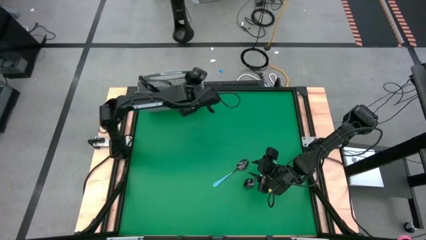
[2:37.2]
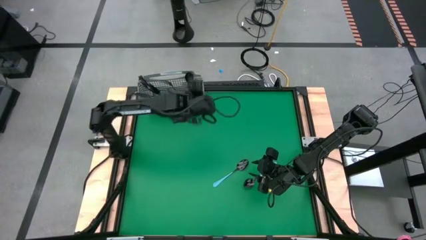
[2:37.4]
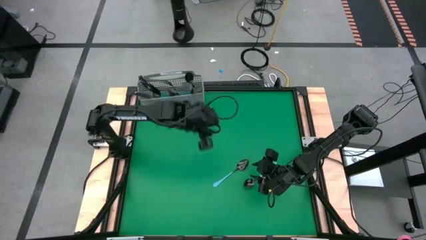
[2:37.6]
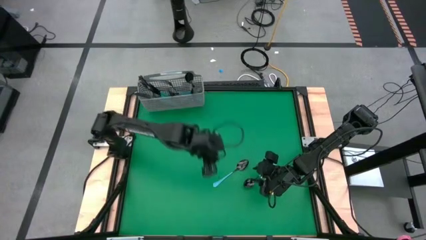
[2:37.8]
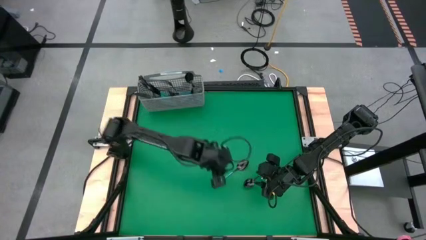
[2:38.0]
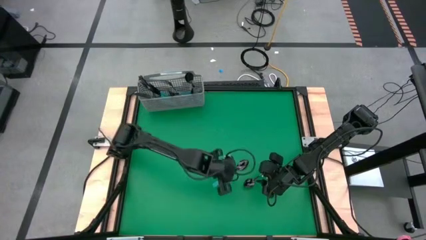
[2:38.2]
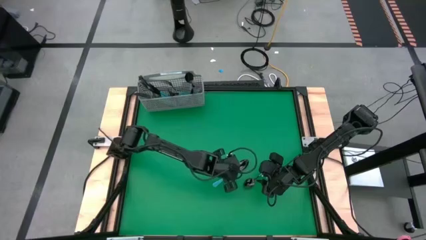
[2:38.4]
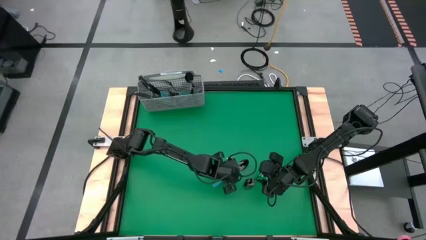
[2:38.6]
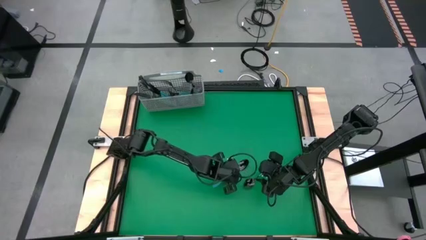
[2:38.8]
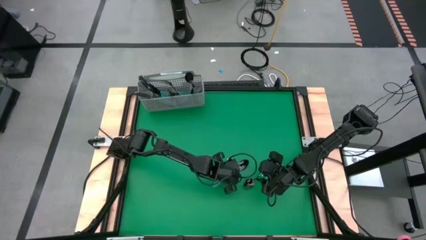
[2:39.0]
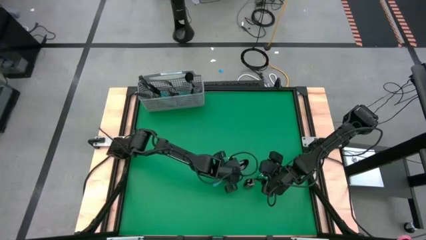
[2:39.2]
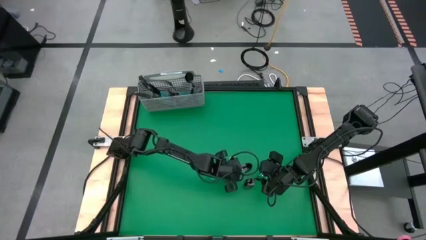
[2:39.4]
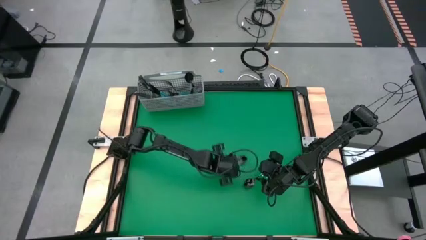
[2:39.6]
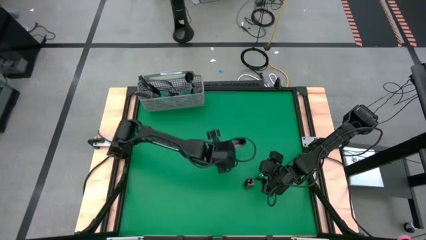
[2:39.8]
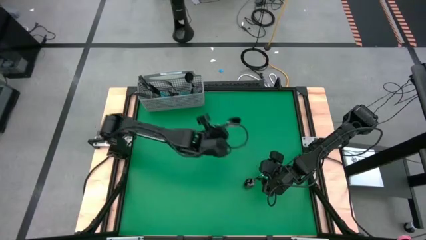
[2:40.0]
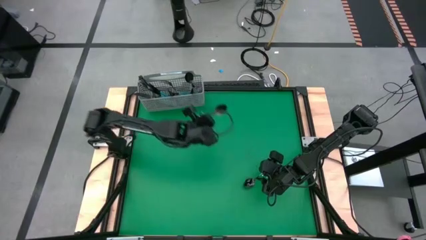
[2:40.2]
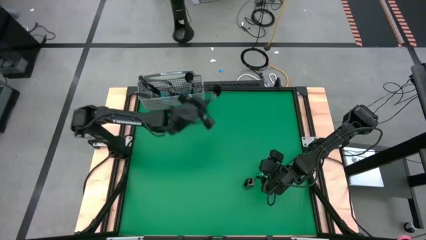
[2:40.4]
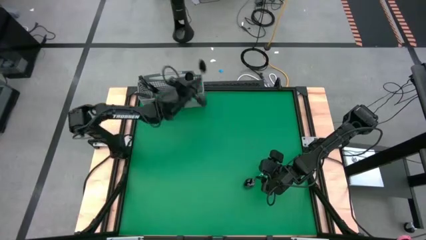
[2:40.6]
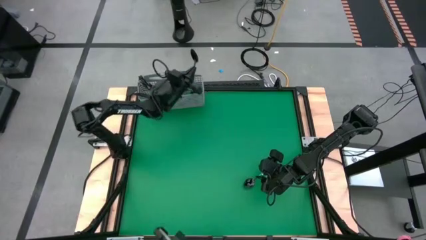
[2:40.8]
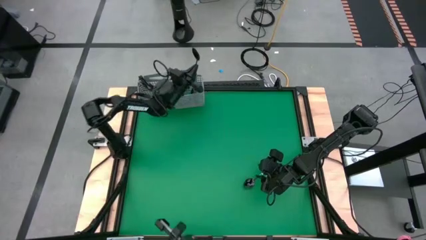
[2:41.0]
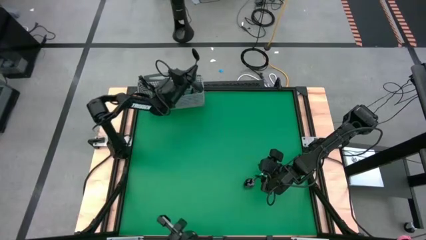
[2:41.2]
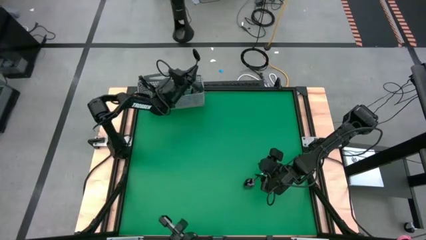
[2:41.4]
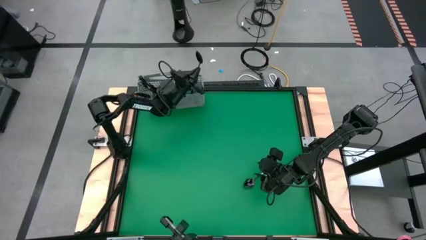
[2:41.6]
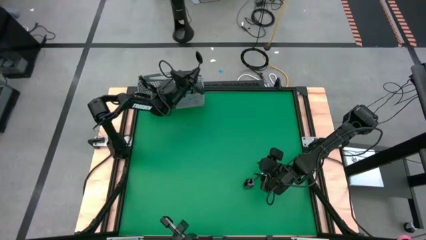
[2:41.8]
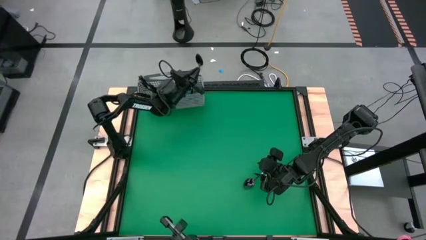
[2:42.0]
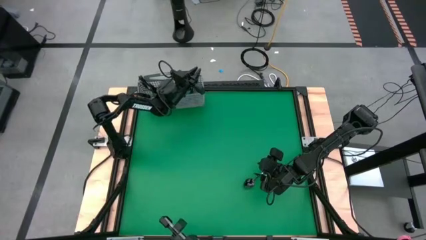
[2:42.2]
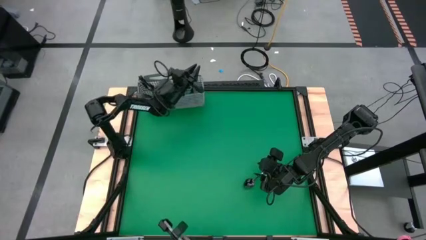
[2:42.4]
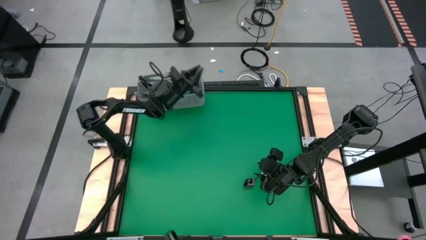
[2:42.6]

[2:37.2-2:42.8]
Task: Sort silverware
Put the spoon into the silverware rack

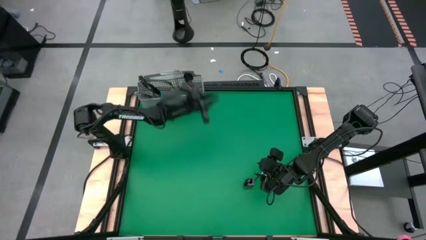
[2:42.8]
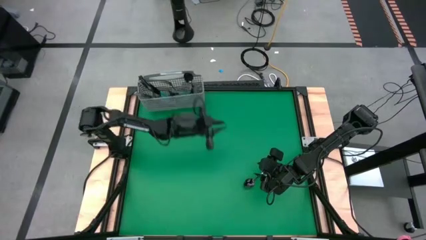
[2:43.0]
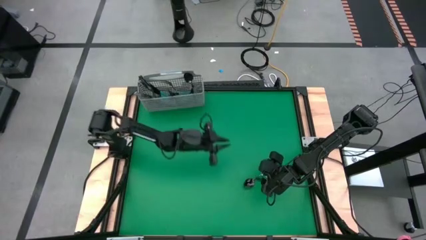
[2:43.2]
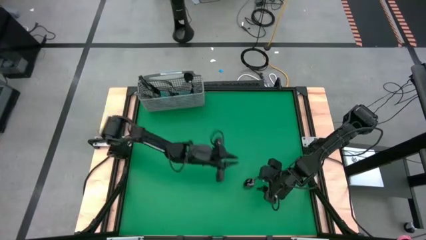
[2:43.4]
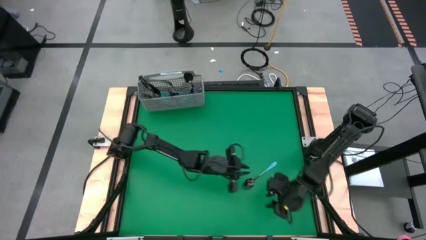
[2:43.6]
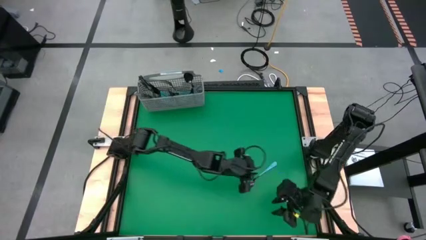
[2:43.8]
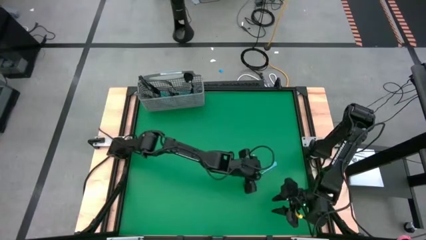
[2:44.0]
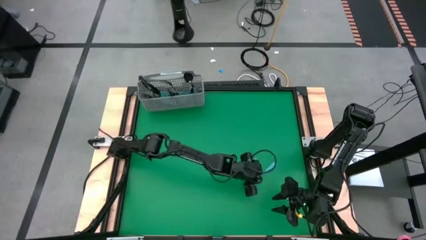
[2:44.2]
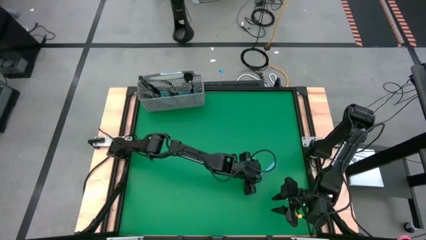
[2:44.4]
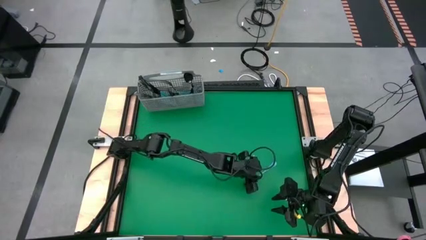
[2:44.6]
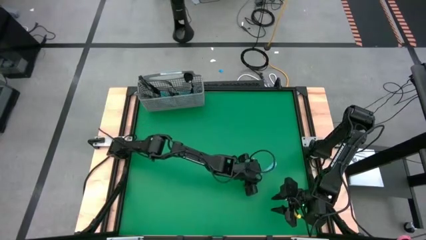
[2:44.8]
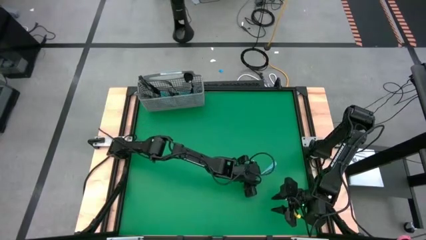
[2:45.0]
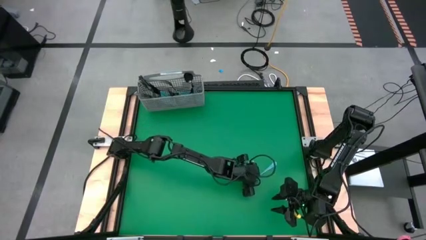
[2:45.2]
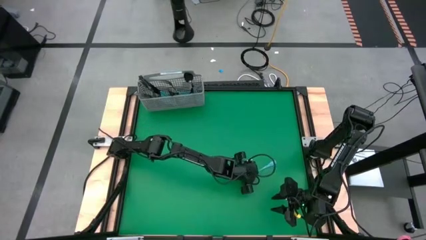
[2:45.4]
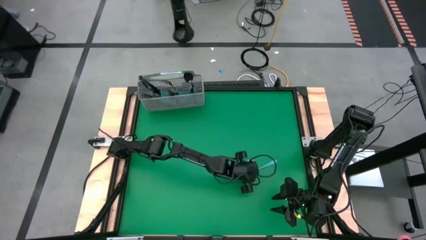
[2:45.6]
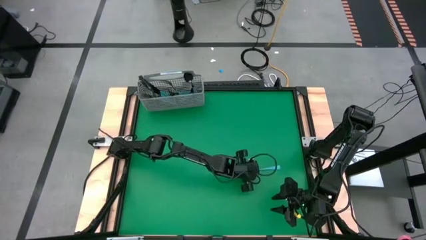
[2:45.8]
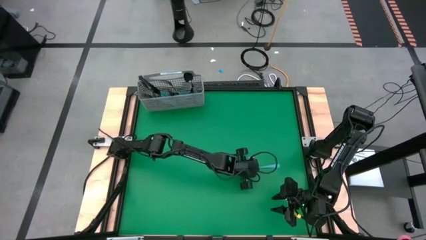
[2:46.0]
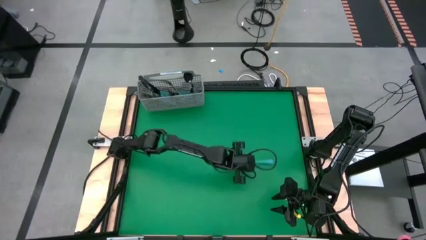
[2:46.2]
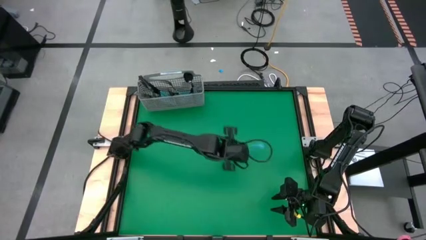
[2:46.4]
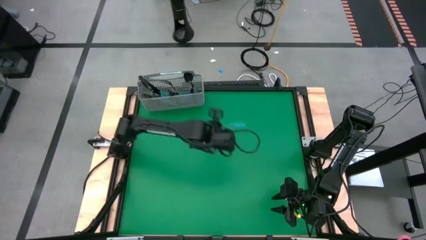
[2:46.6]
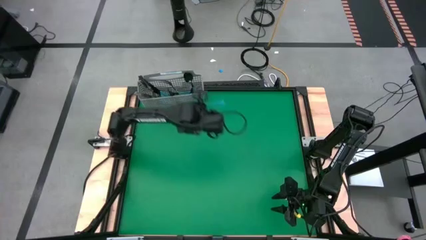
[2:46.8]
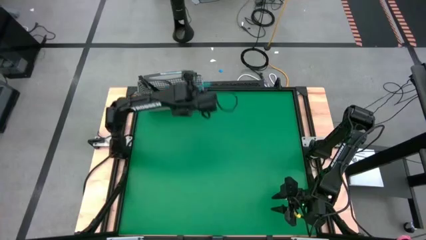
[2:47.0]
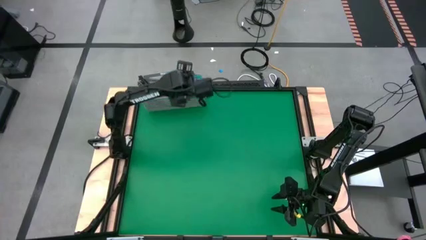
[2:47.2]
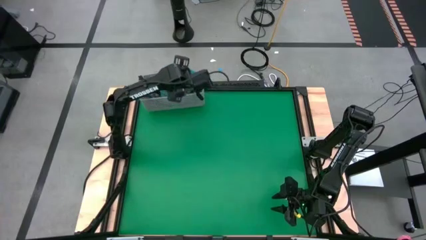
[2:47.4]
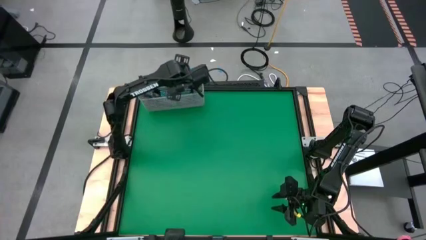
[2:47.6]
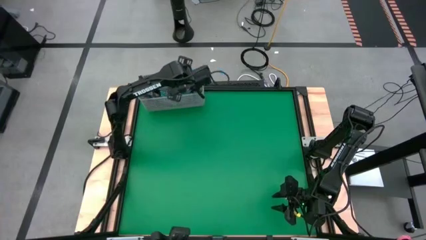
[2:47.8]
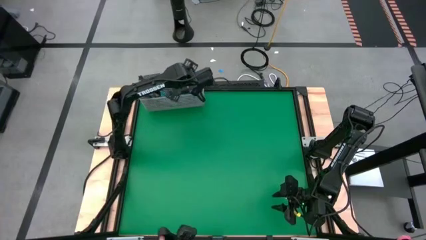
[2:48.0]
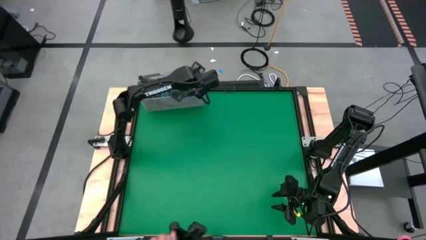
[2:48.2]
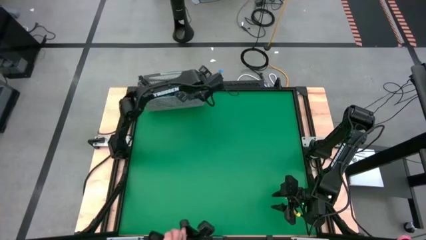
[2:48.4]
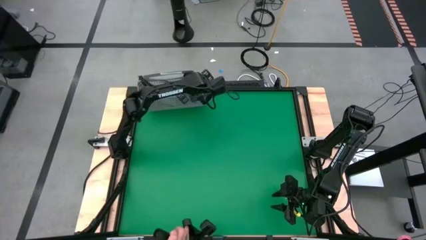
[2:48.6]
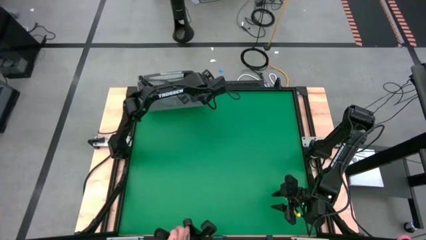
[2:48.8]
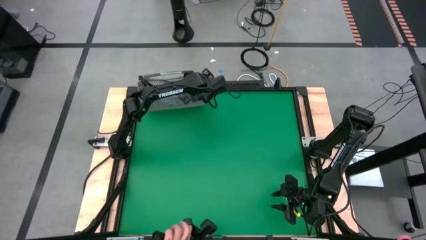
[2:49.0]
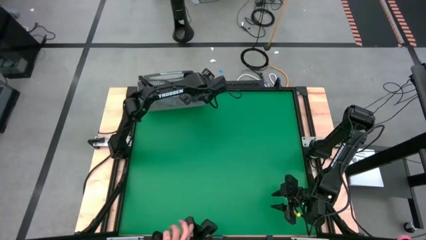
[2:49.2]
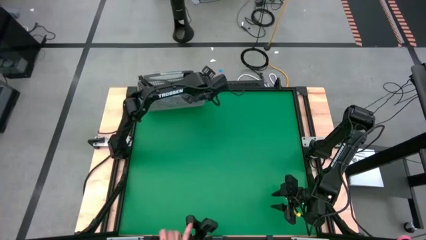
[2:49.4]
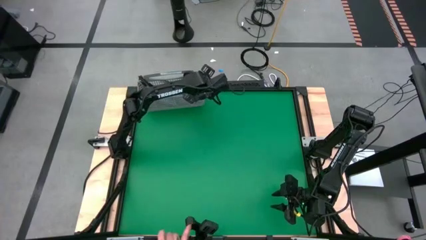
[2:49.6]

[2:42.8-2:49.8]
Put the spoon into the silverware rack

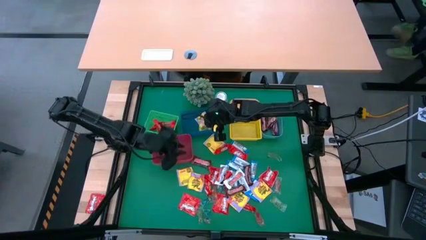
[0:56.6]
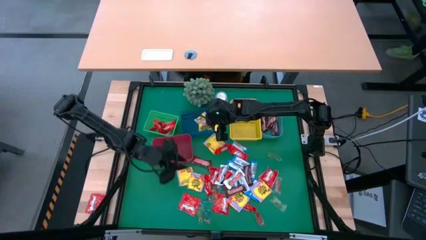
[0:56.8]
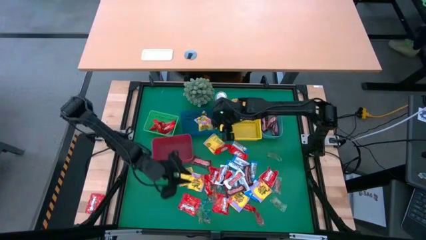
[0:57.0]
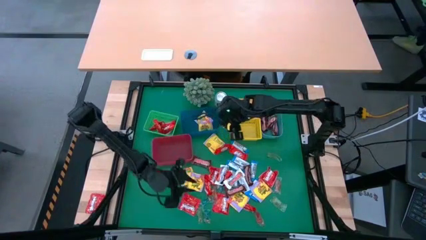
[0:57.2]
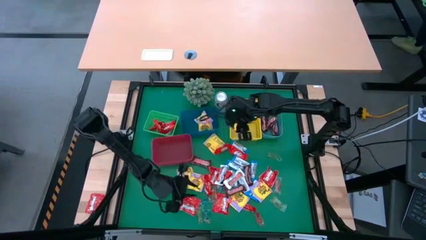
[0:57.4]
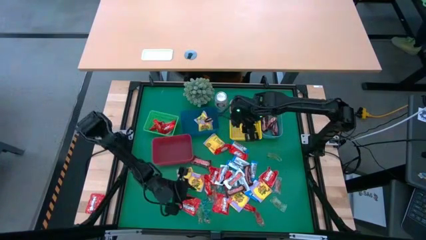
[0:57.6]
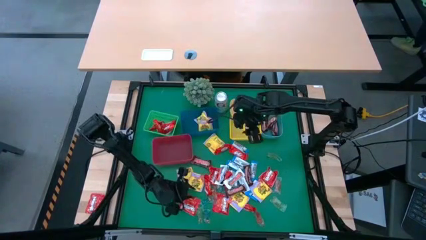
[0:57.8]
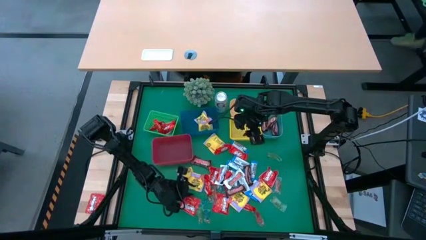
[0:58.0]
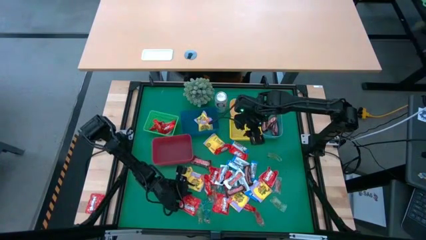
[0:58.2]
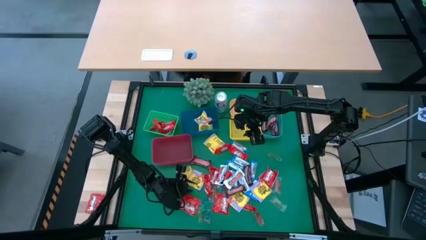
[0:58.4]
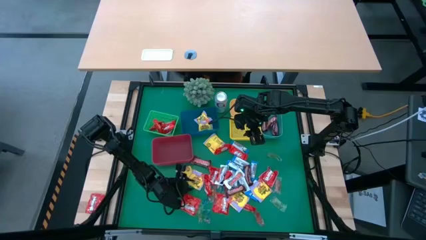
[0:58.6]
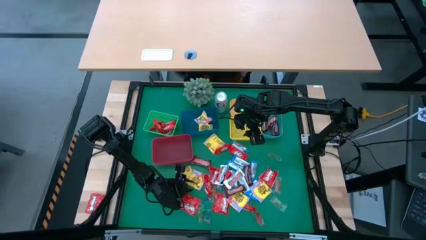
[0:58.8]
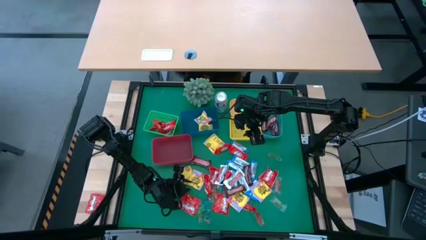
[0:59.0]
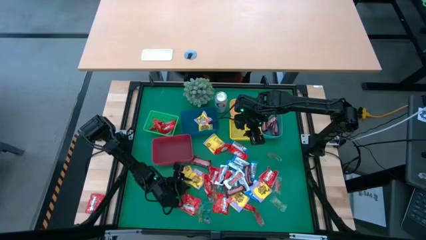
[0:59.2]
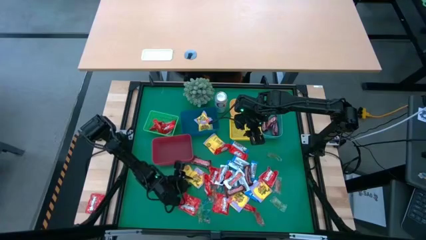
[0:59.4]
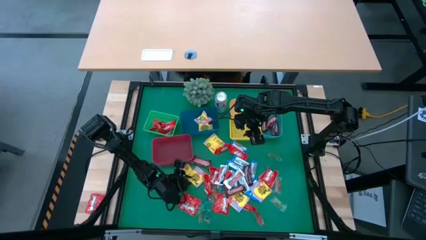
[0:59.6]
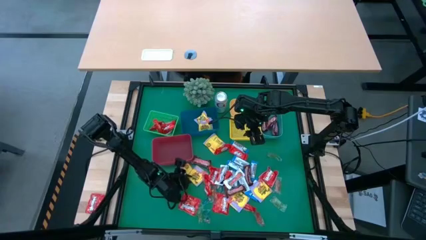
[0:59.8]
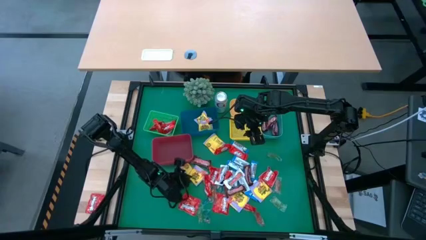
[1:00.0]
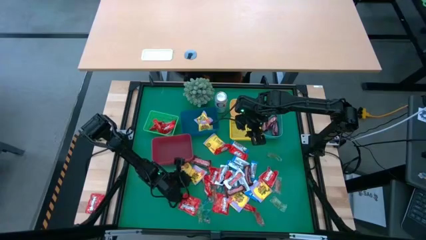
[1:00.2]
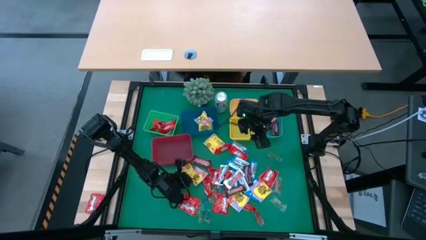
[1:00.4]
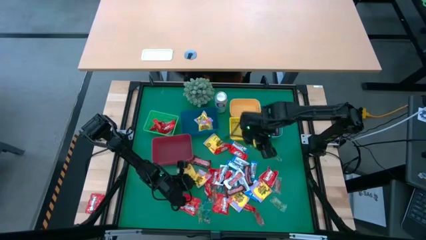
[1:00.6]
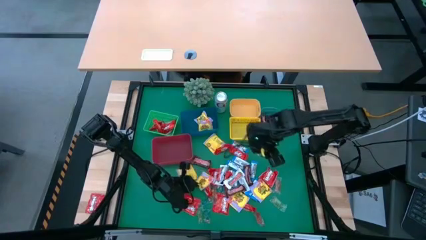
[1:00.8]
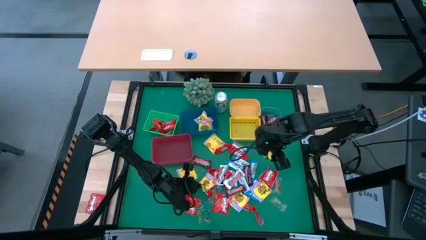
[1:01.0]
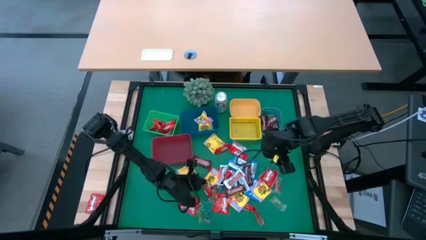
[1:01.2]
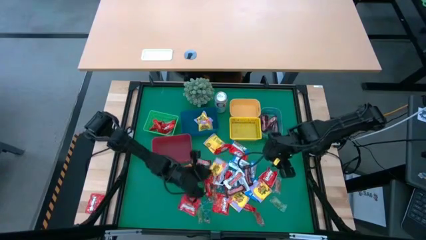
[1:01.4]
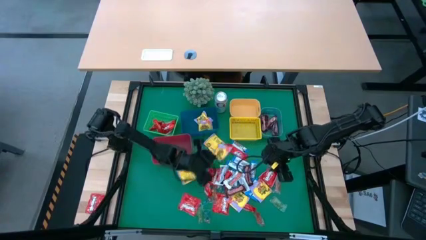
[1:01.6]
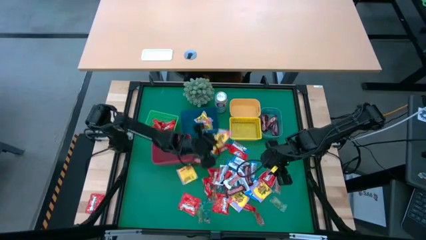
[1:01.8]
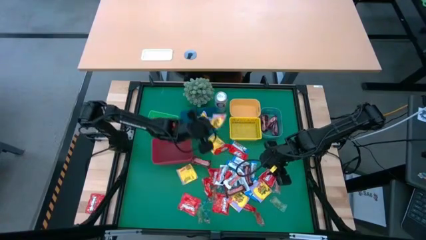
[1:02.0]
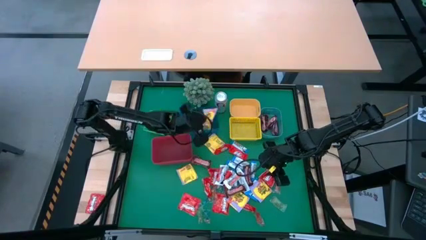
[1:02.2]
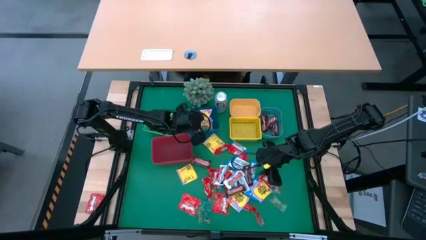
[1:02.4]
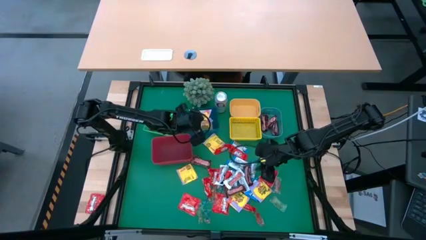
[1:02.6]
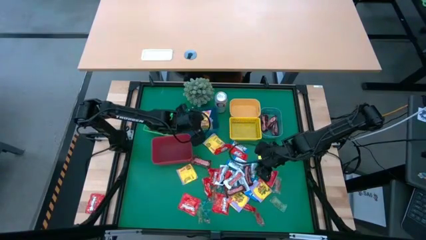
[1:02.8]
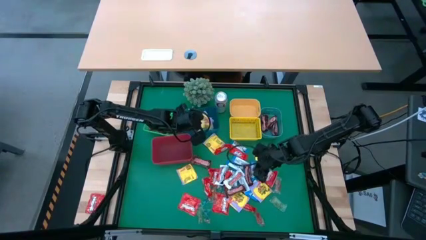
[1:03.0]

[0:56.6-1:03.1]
Task: Sort candy
Put the yellow candy pack into the blue bin
